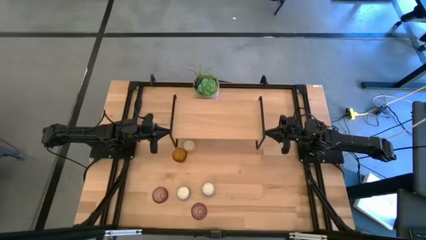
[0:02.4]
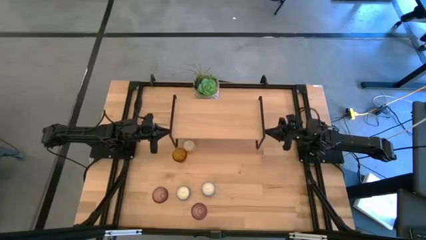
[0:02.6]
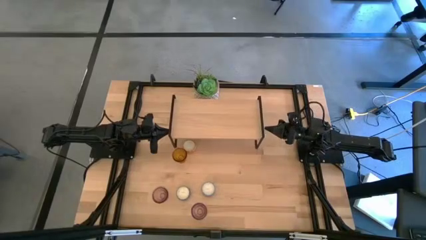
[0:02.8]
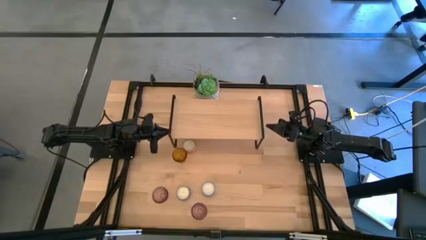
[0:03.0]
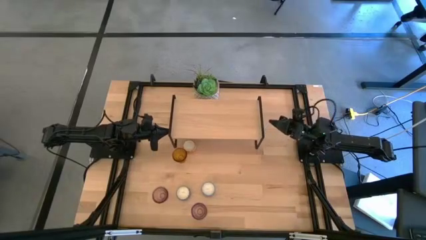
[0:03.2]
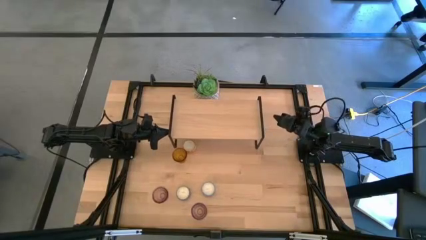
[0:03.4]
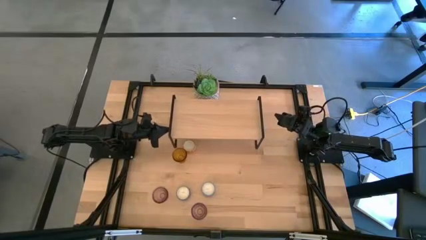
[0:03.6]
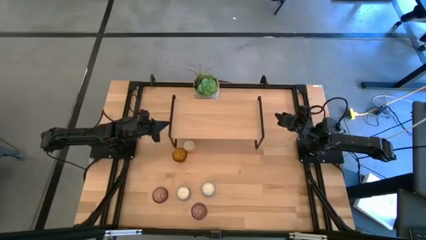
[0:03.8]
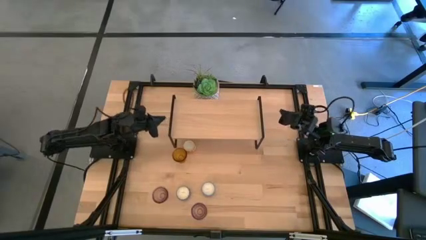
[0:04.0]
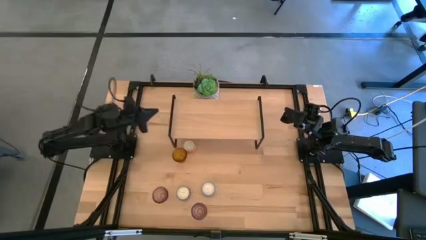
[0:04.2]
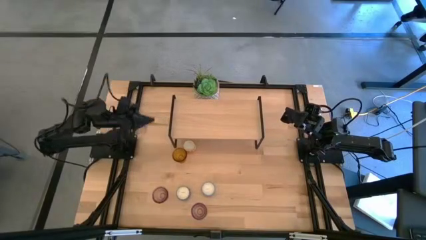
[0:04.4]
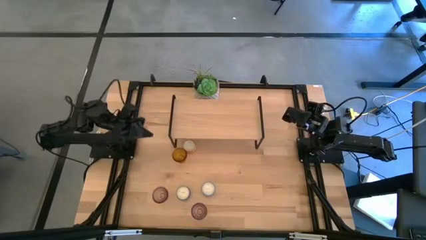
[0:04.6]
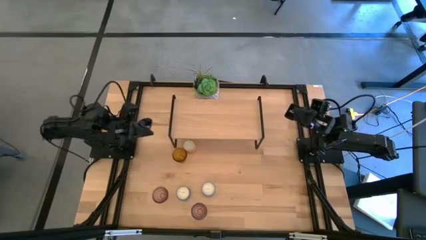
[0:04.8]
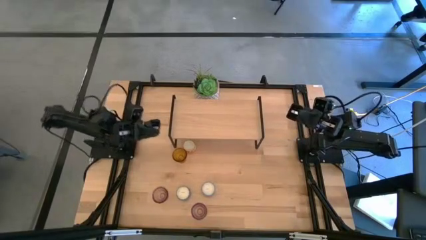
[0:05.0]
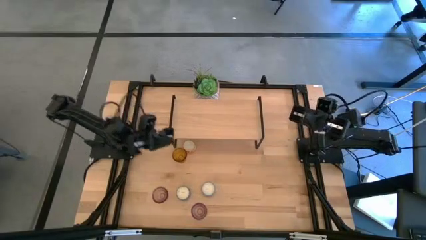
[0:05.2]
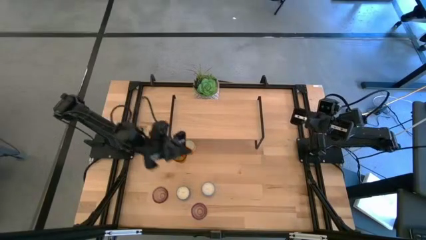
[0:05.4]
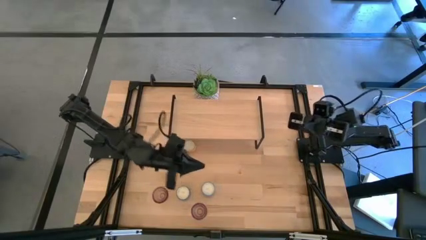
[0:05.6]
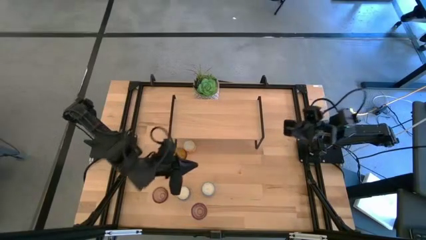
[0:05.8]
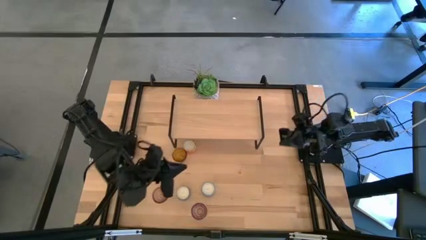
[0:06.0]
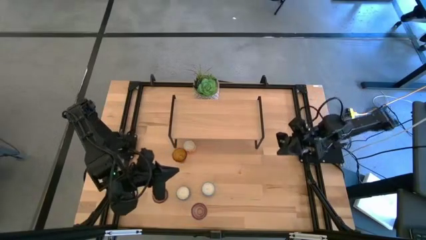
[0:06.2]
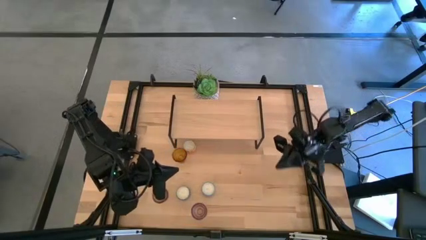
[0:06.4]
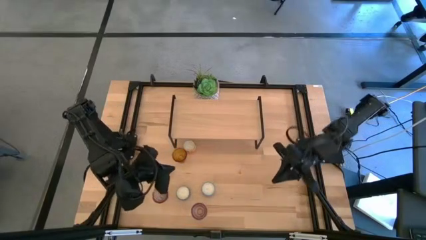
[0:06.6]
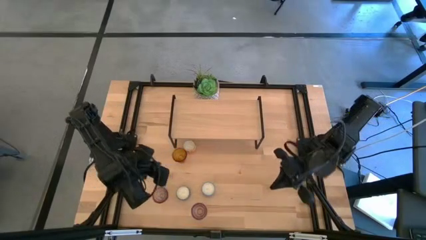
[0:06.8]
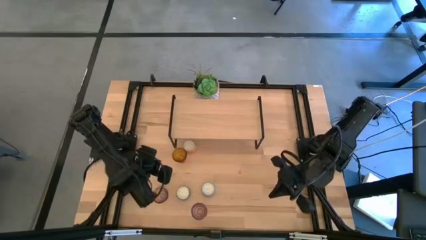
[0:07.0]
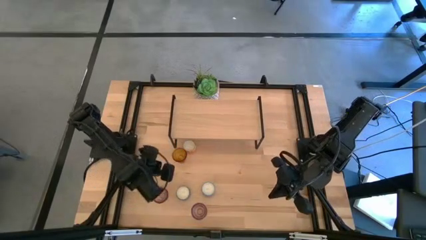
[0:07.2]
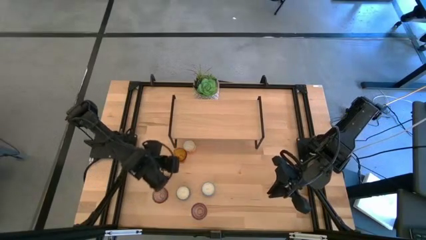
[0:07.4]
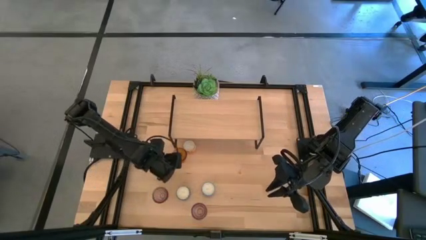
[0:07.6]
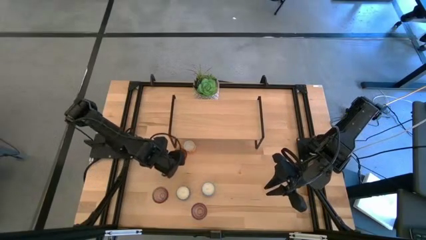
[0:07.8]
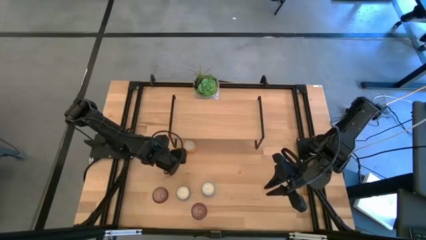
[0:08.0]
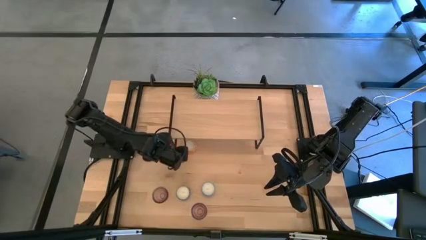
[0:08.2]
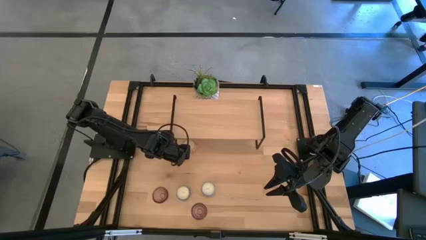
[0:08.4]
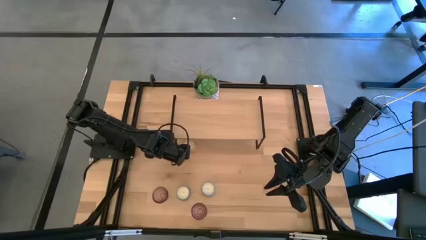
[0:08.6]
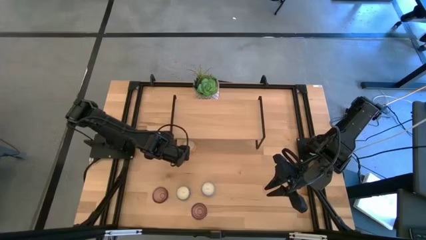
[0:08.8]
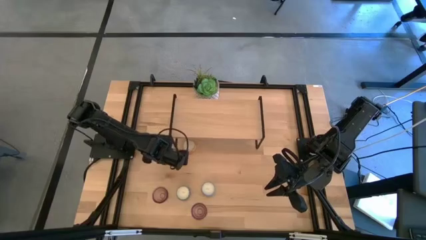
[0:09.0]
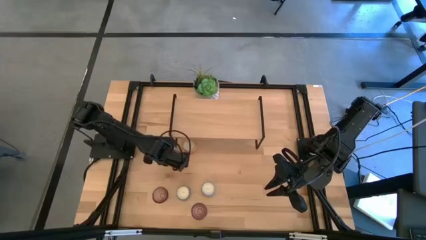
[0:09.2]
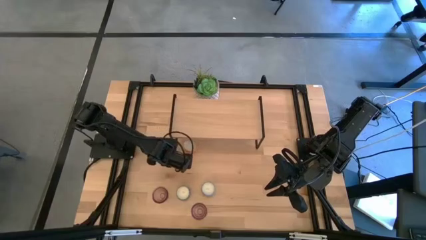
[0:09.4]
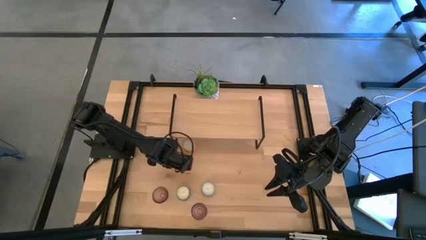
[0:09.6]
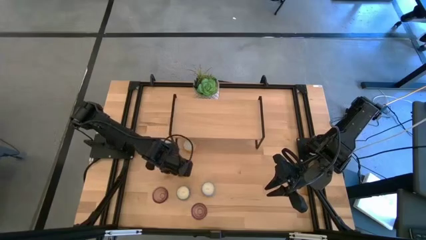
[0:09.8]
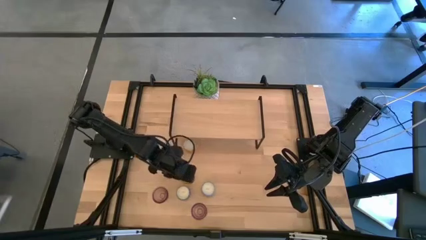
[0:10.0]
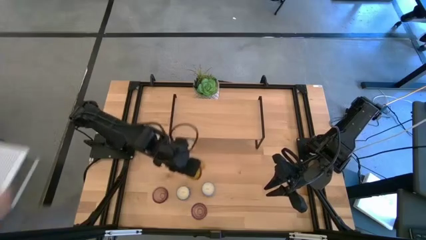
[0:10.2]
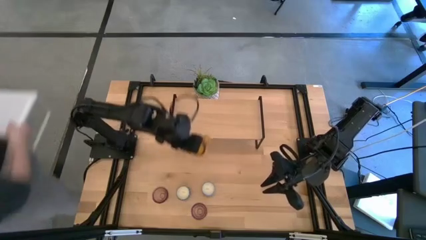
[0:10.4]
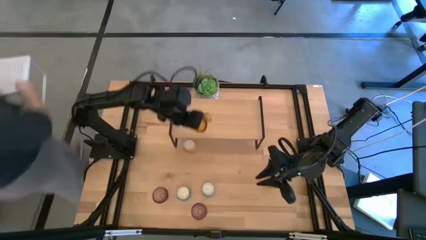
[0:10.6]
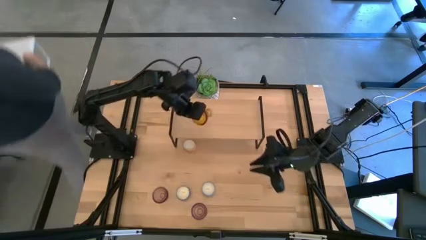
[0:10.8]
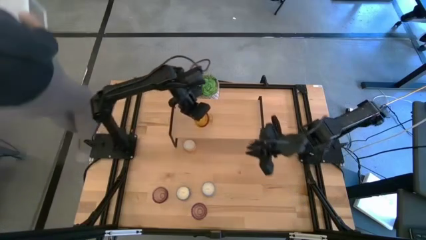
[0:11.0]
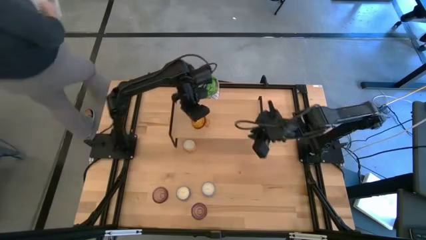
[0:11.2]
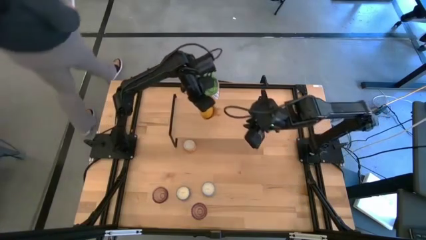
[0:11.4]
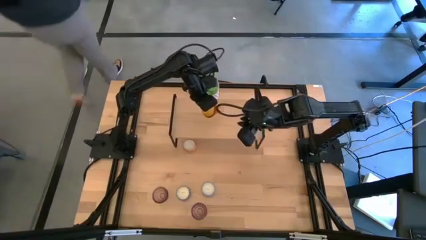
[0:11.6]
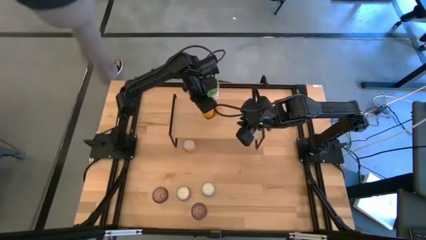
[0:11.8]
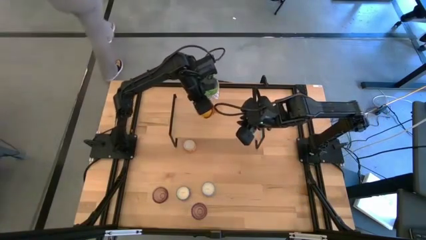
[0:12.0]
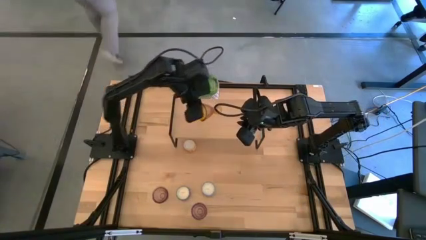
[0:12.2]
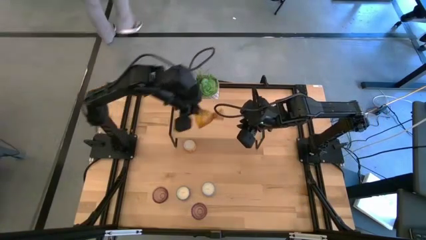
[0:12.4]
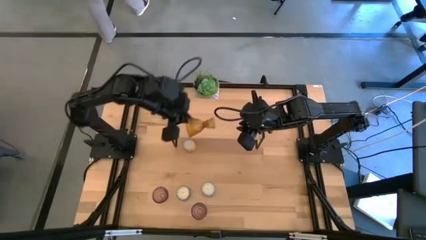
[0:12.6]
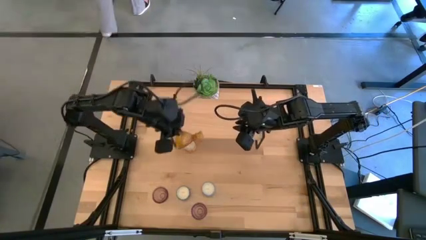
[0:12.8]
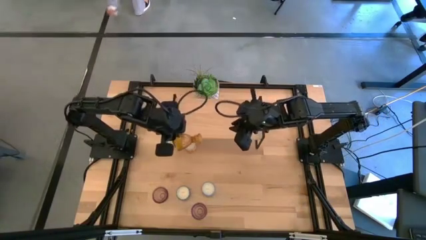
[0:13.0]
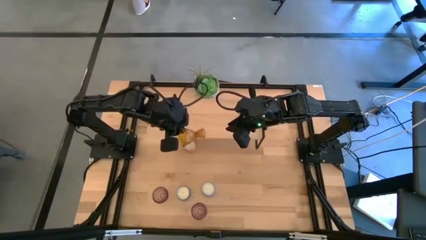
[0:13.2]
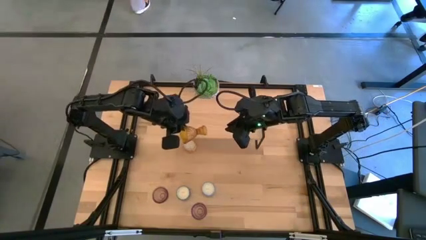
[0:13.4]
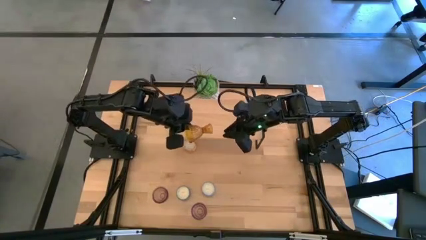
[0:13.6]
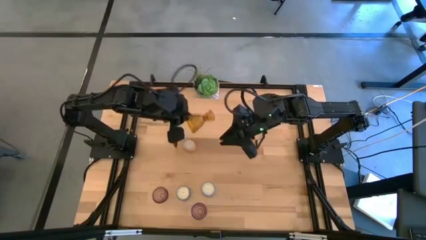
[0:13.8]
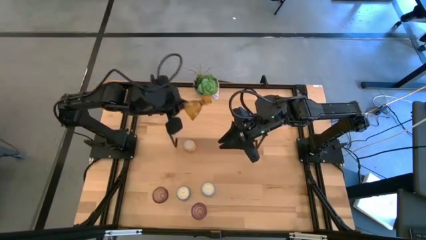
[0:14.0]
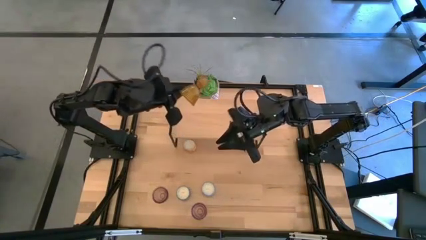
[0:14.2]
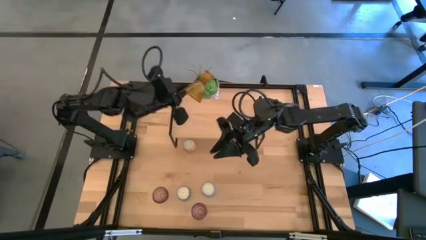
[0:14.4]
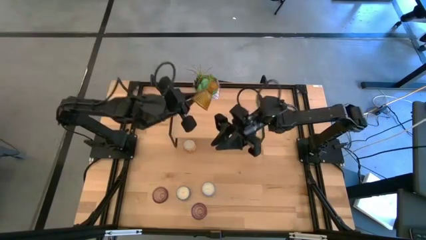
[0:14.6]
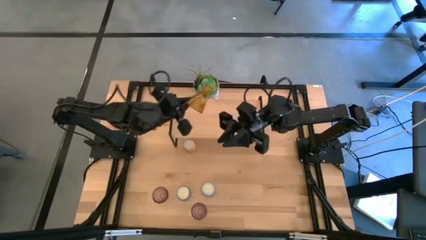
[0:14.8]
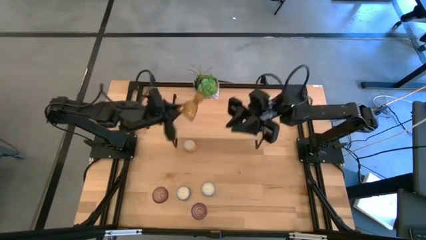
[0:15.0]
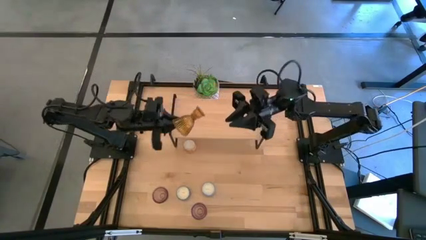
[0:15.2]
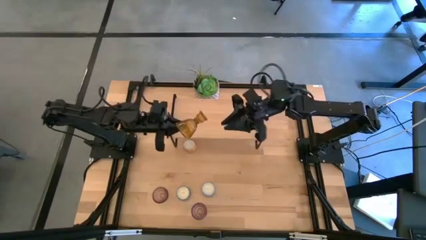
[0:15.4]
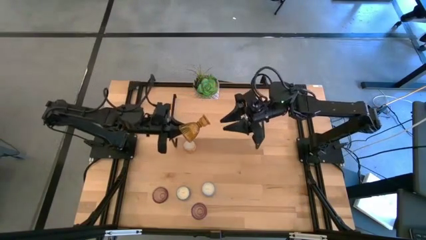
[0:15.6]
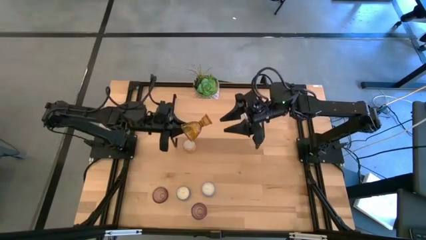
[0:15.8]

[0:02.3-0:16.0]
Task: Pick & Place candle stick holders
Put the orange candle holder on the shelf
